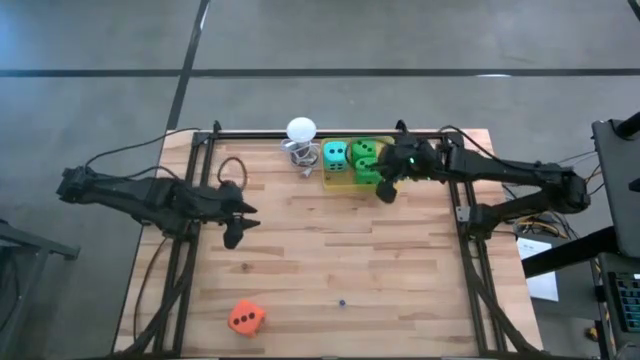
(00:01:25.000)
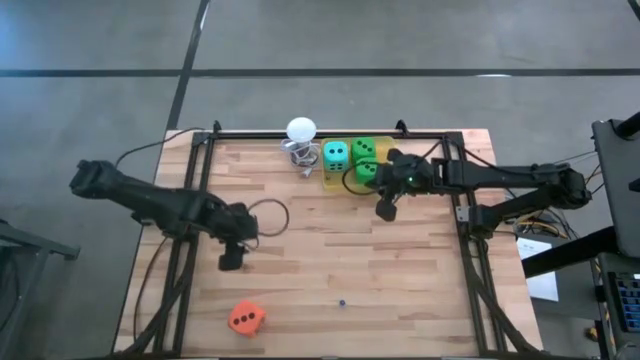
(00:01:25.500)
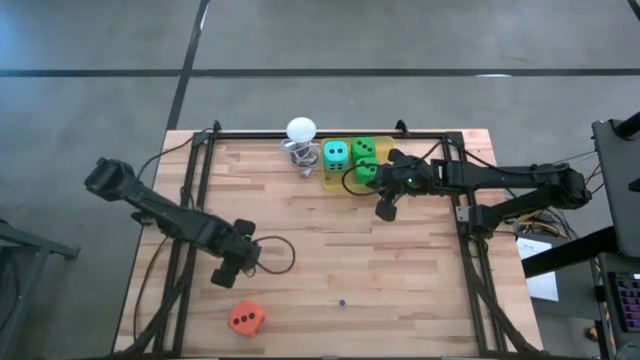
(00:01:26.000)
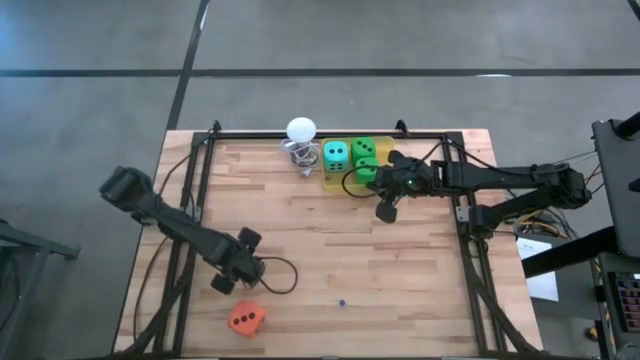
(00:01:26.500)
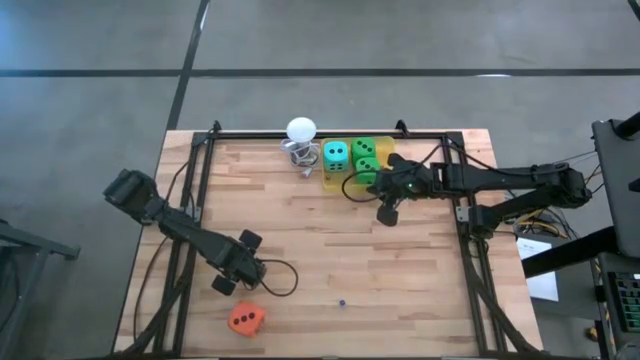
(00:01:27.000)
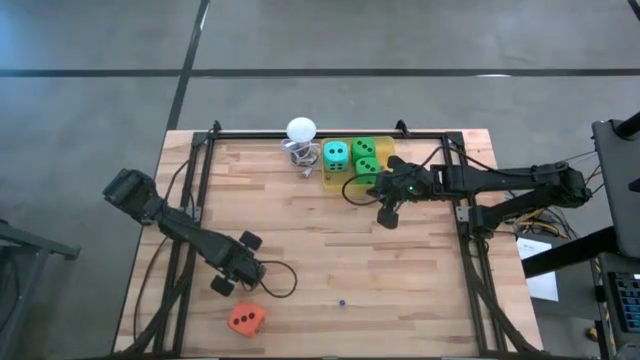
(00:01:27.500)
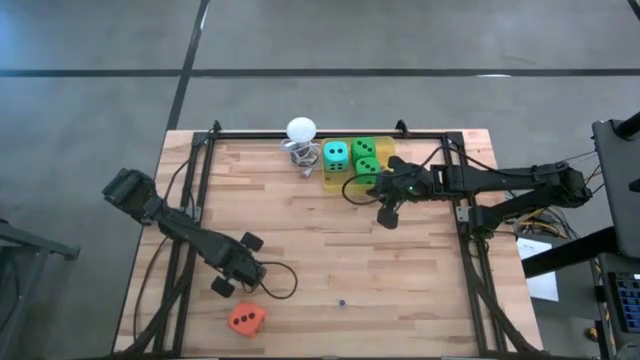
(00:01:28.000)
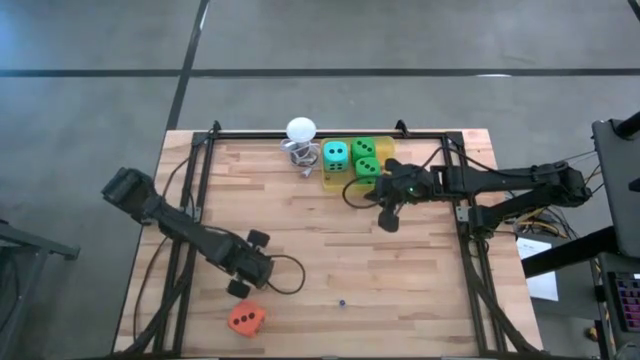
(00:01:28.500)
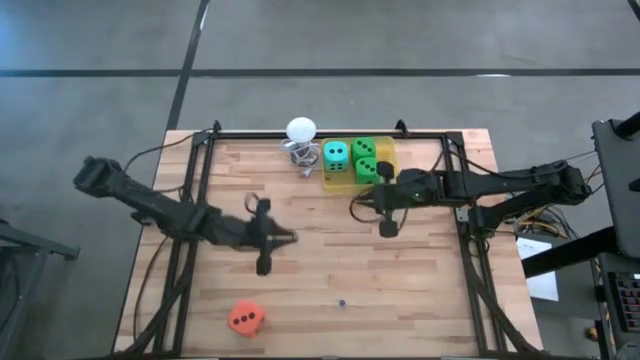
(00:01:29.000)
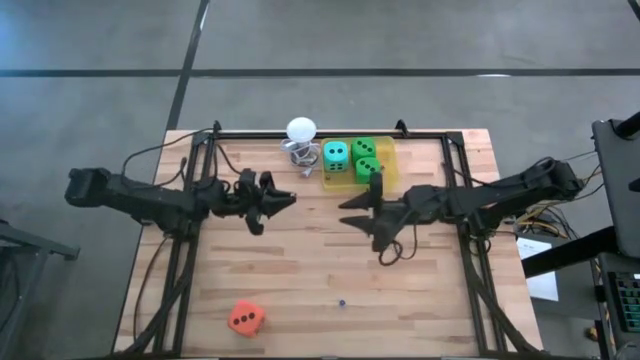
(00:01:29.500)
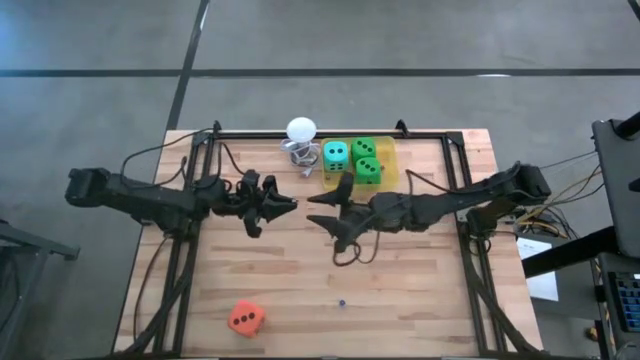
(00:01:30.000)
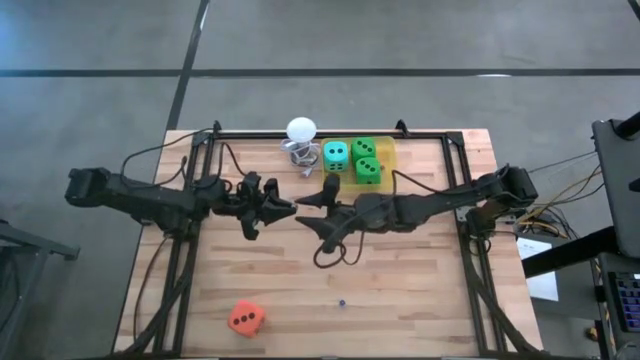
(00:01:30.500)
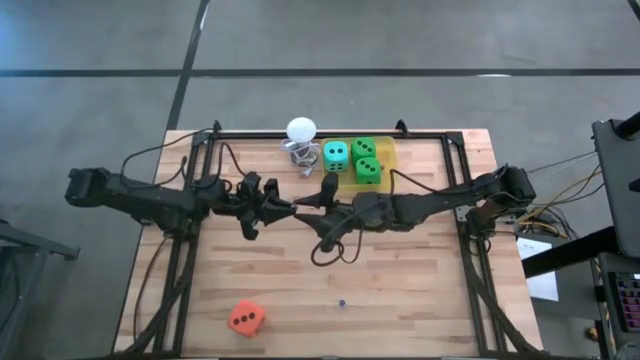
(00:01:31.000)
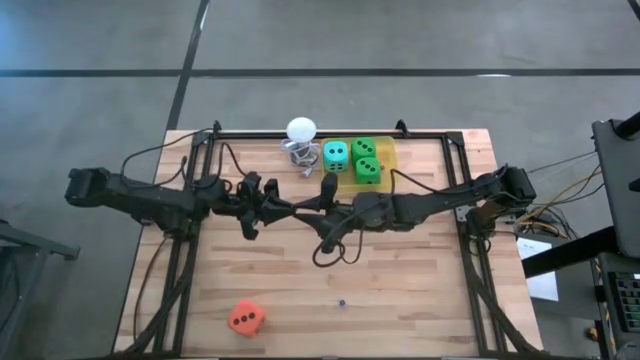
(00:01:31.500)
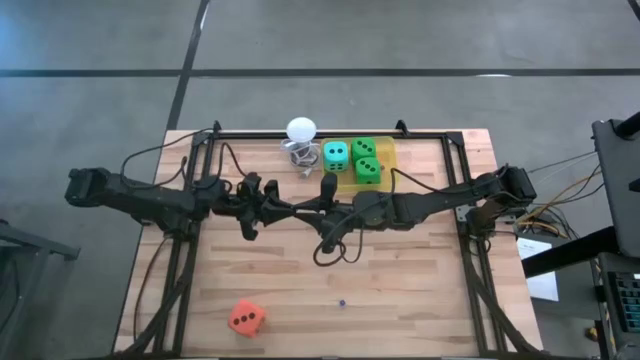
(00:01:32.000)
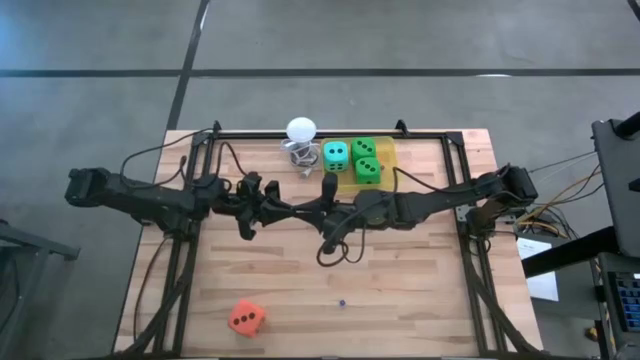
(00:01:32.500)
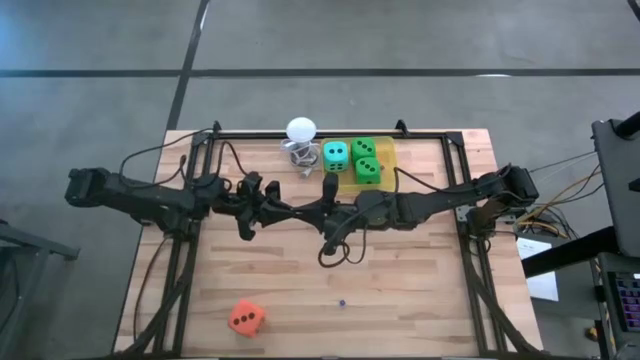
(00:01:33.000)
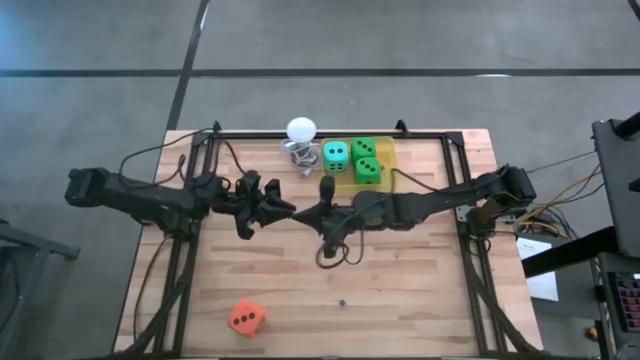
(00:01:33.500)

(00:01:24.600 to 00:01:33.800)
Task: Pick & Place Dice
Put the small black dice into the yellow bin

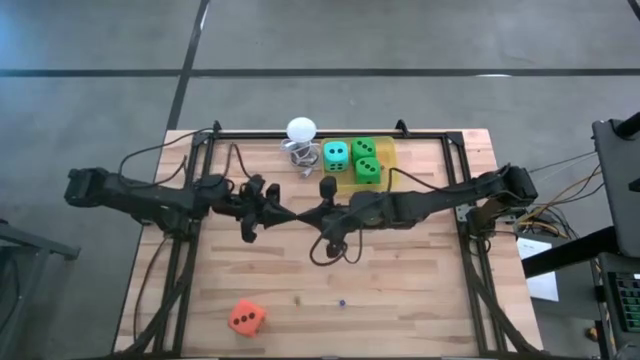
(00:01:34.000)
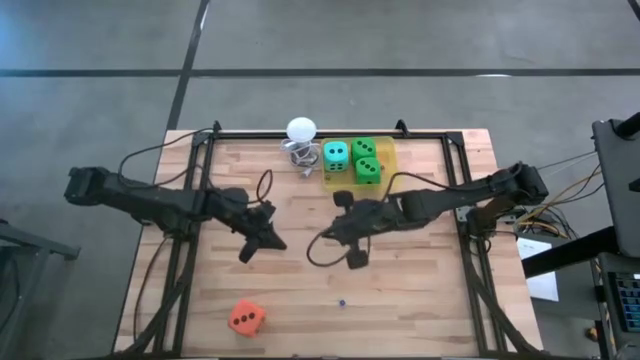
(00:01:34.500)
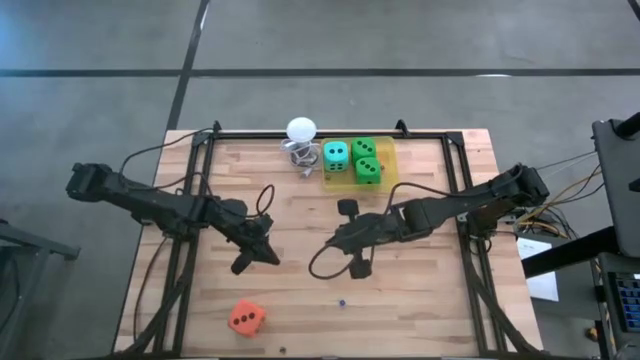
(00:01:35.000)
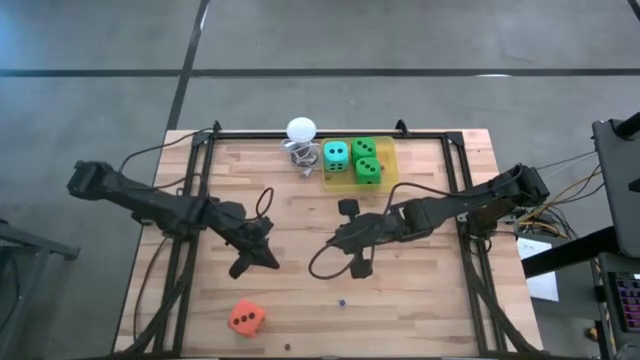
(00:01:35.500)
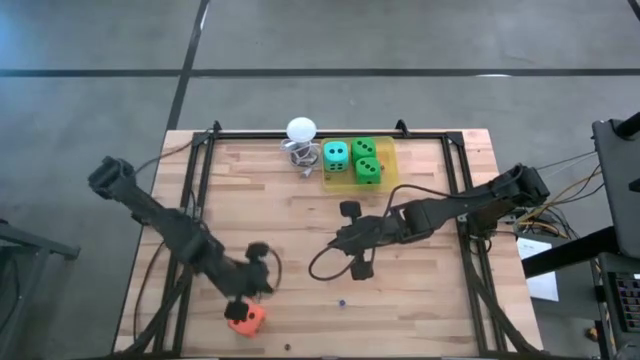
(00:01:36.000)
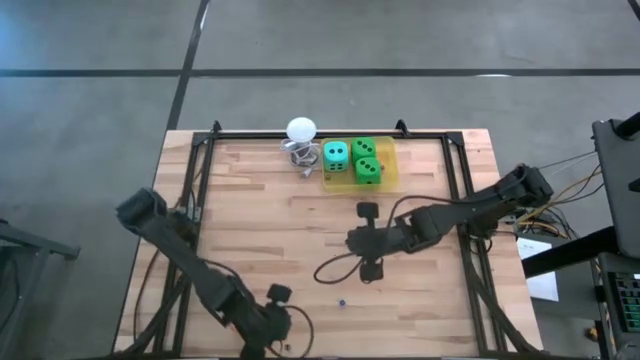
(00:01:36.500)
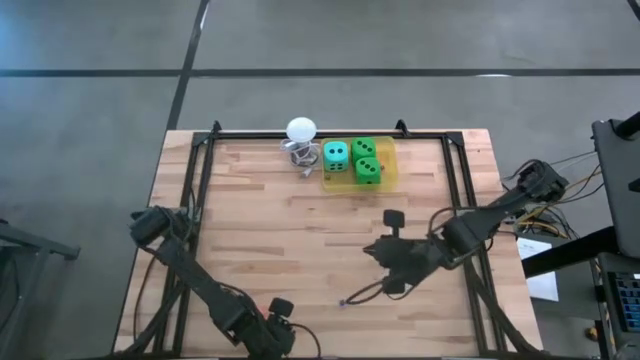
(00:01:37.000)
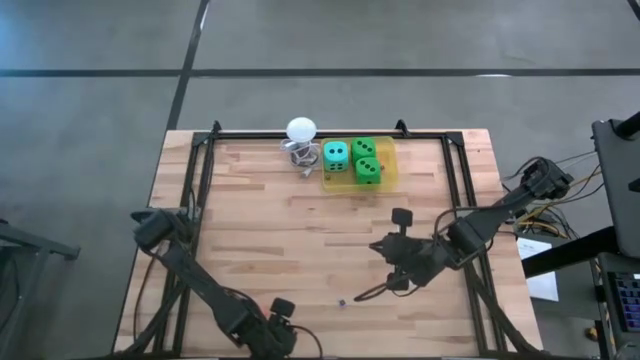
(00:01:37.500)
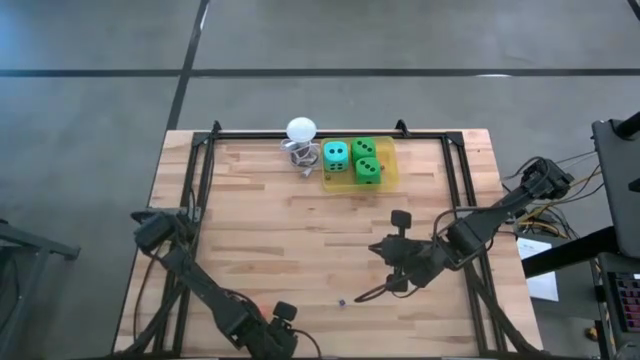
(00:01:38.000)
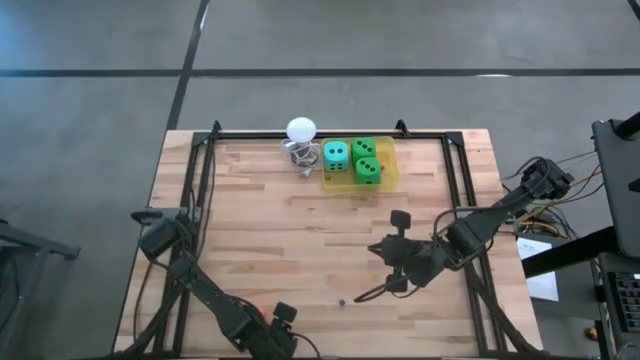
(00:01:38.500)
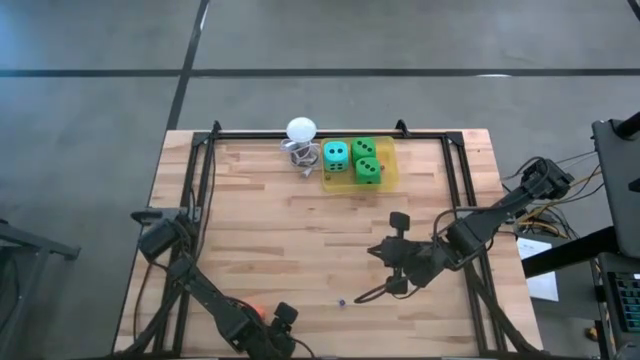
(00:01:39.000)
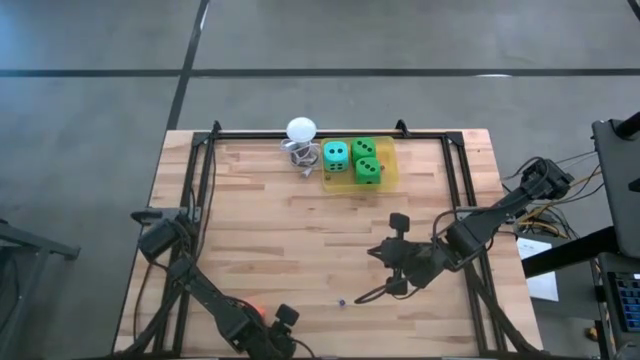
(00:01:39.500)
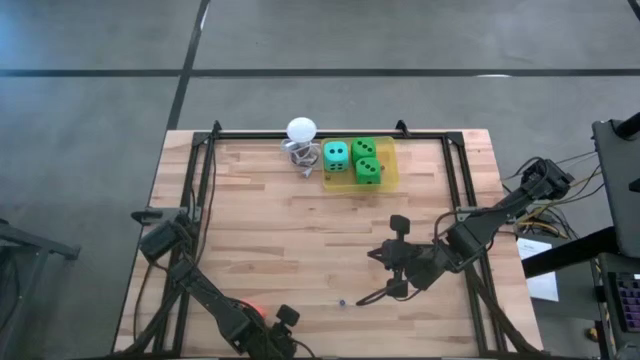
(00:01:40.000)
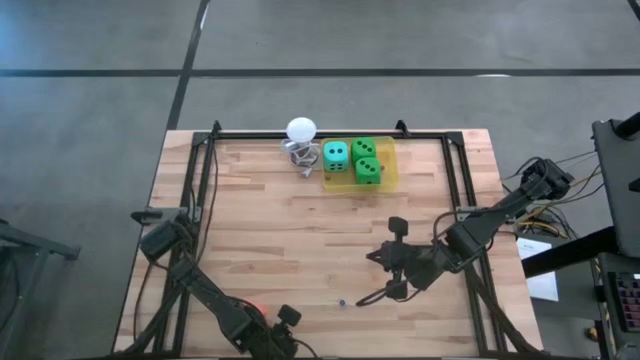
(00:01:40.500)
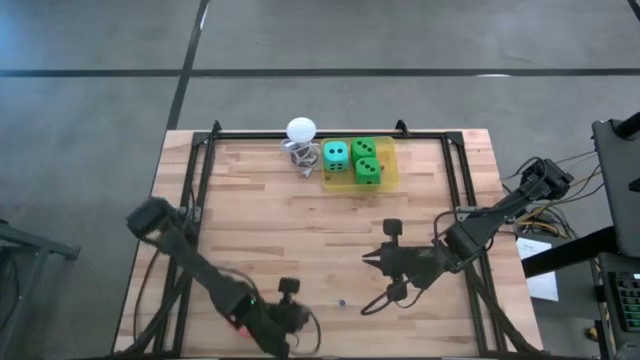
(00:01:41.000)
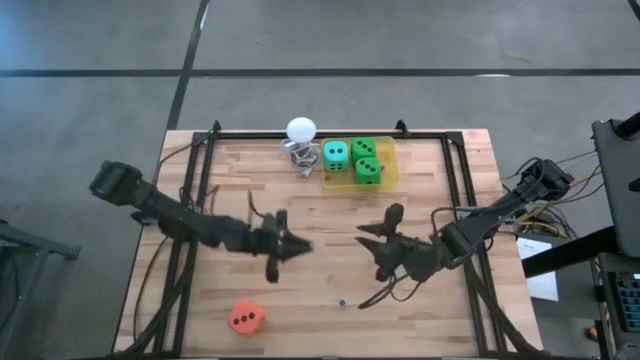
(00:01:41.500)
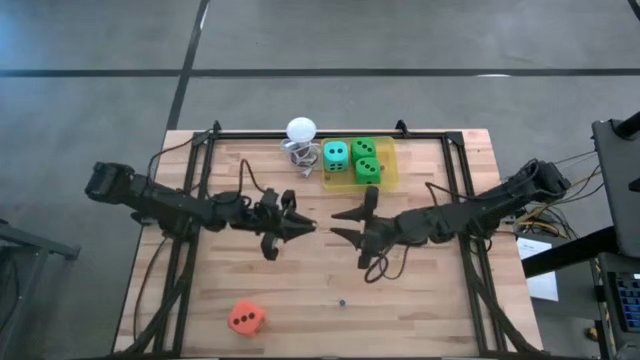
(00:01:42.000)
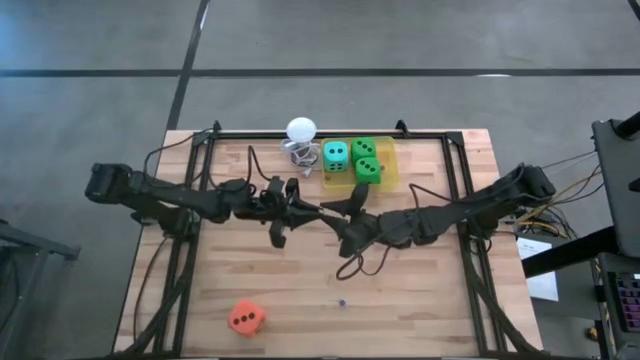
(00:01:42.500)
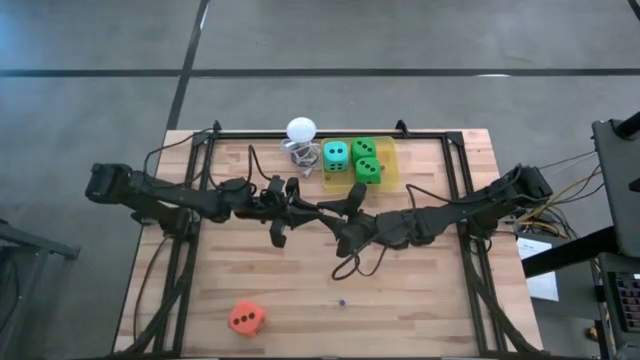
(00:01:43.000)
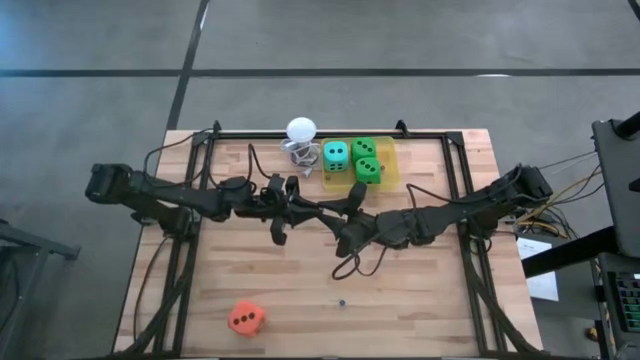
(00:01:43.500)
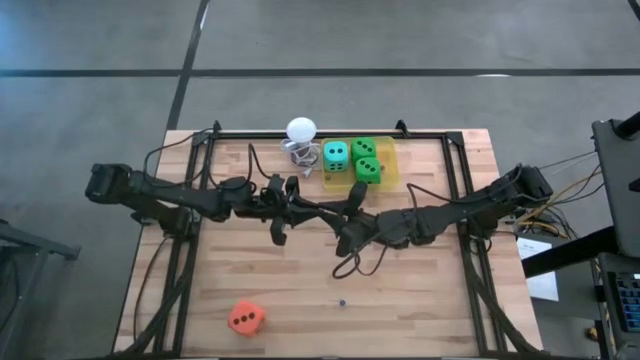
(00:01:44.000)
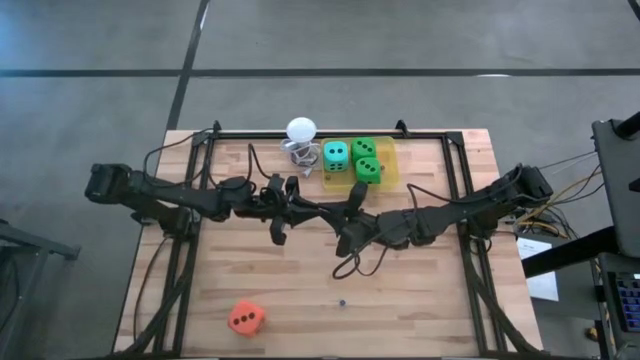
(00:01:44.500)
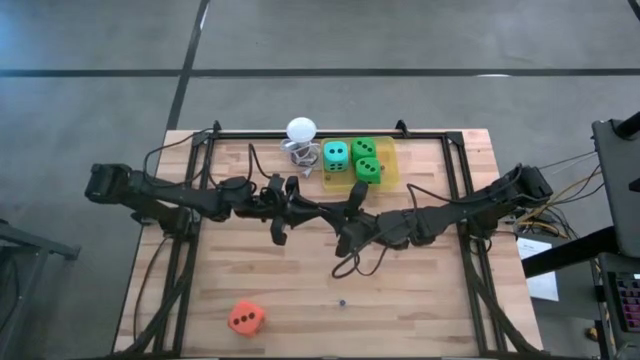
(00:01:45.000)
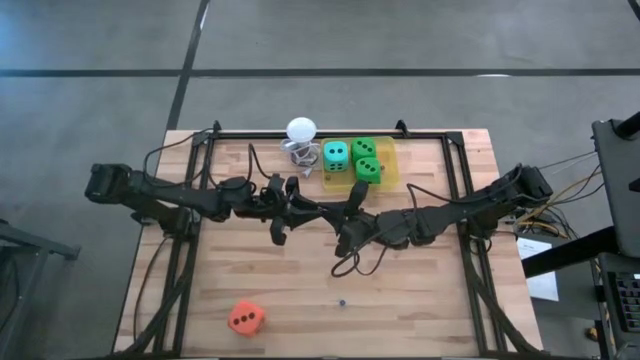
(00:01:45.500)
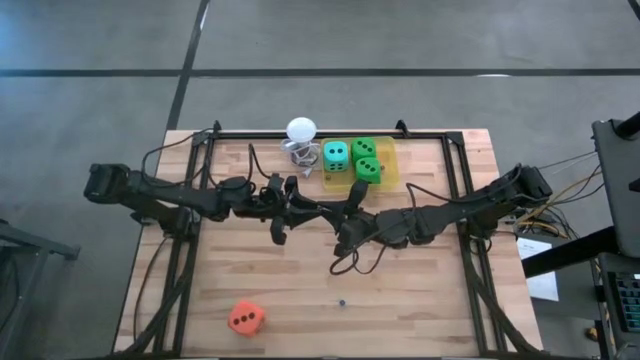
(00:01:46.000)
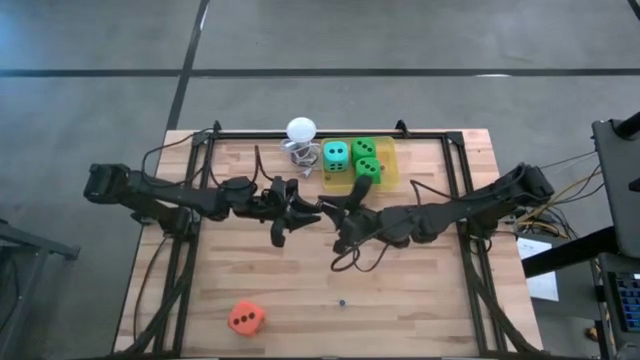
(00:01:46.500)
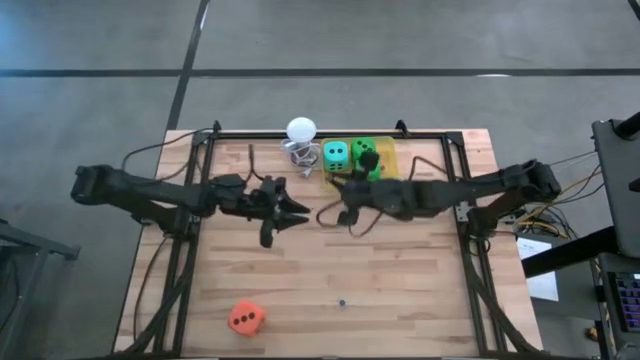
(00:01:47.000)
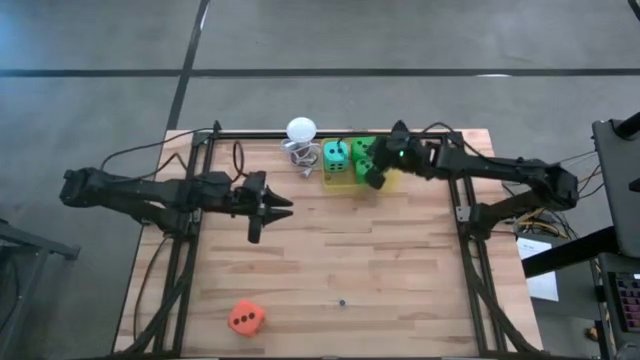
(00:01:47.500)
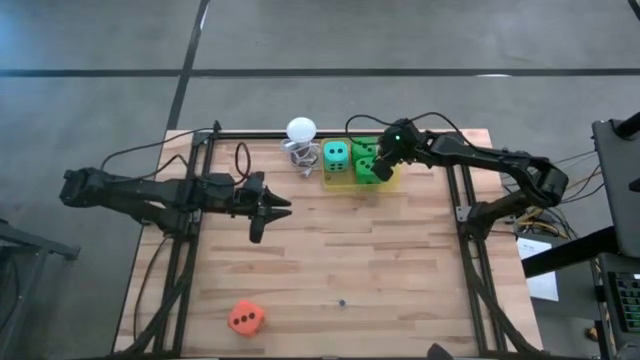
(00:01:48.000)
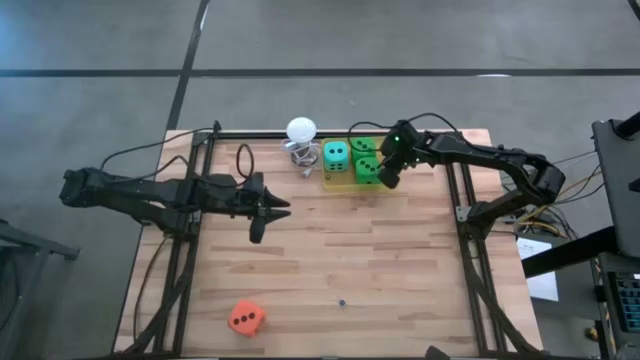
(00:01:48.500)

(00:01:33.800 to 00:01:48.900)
Put the small black dice into the yellow bin
